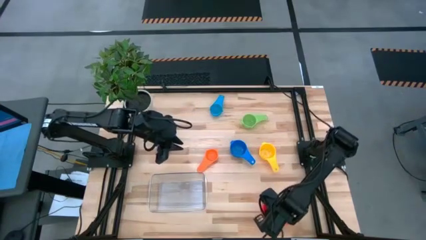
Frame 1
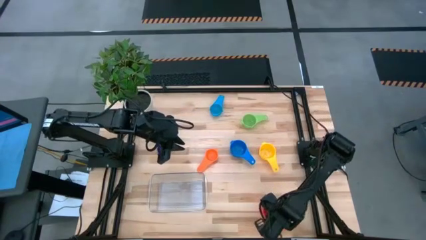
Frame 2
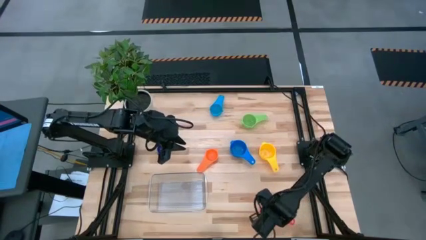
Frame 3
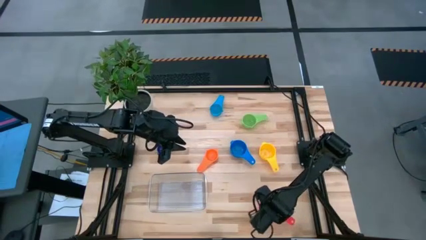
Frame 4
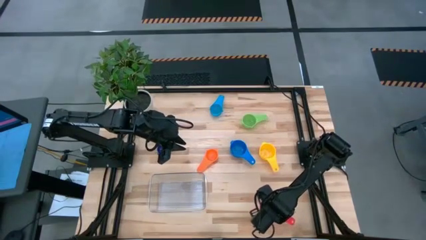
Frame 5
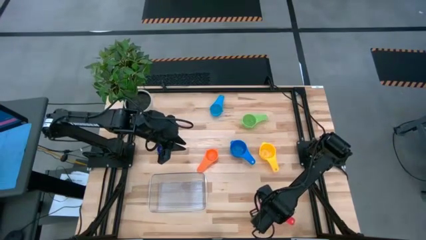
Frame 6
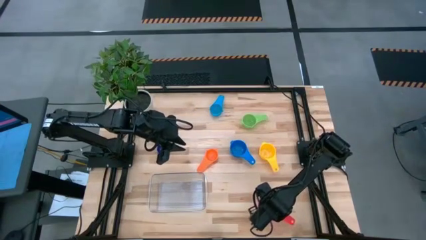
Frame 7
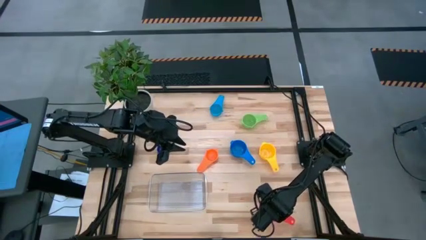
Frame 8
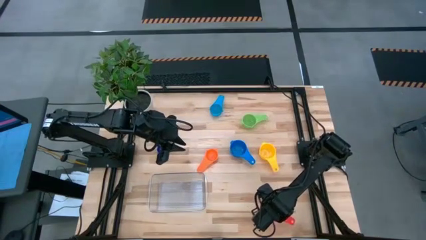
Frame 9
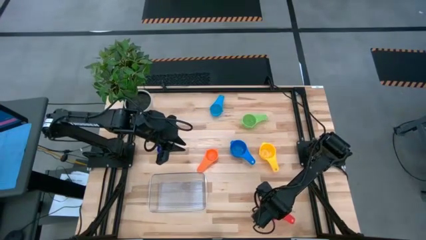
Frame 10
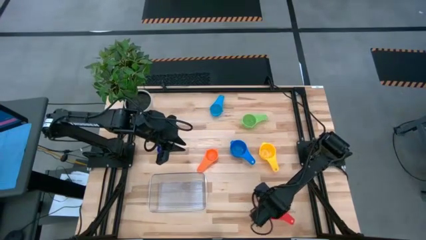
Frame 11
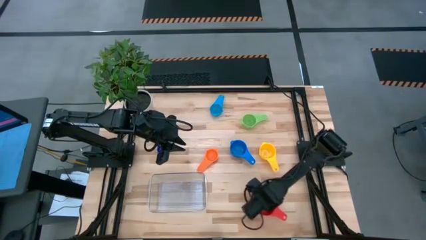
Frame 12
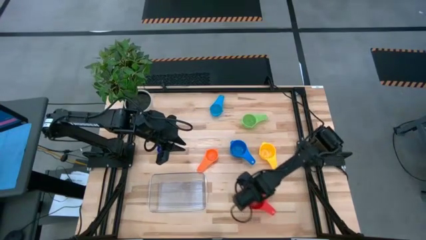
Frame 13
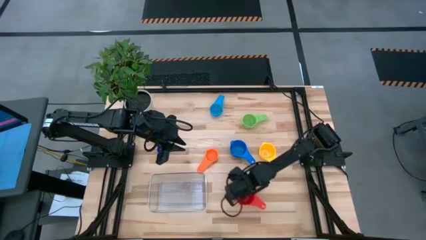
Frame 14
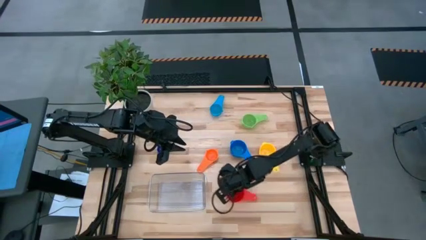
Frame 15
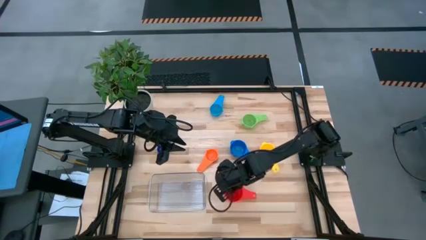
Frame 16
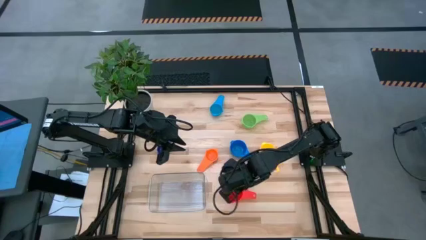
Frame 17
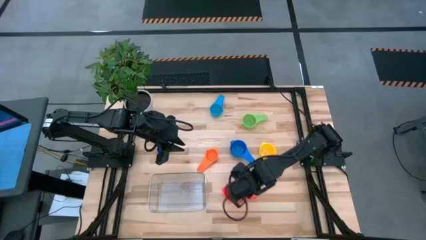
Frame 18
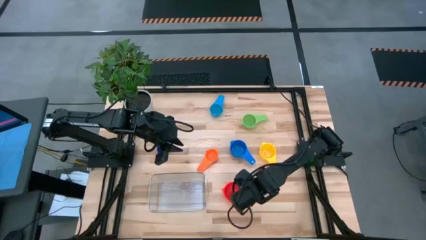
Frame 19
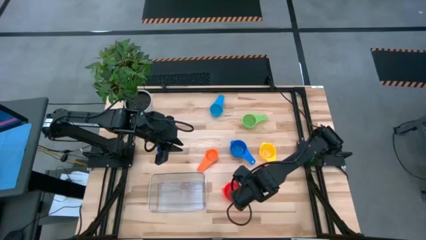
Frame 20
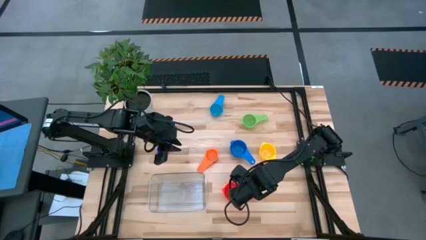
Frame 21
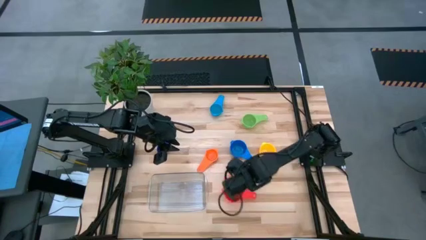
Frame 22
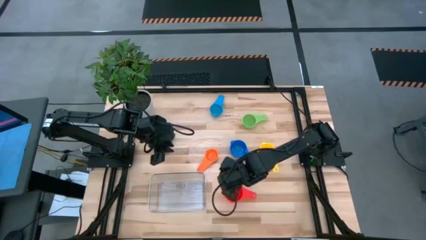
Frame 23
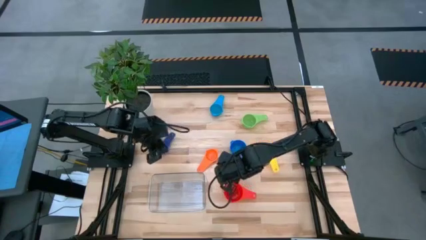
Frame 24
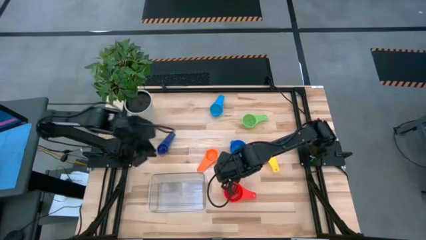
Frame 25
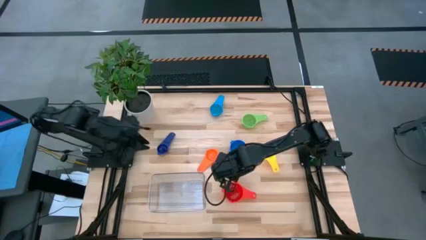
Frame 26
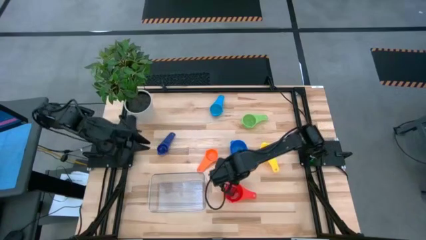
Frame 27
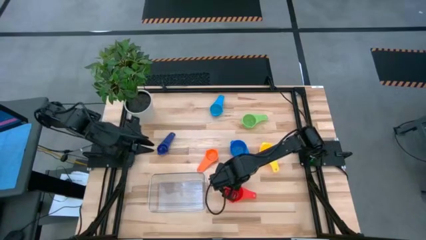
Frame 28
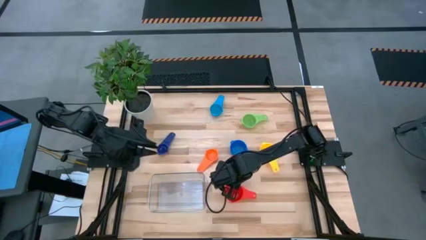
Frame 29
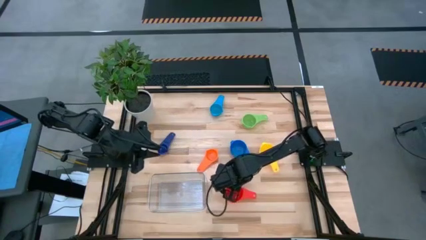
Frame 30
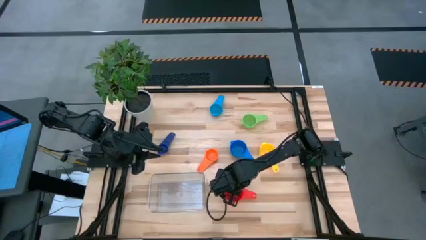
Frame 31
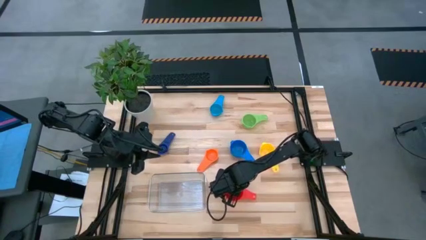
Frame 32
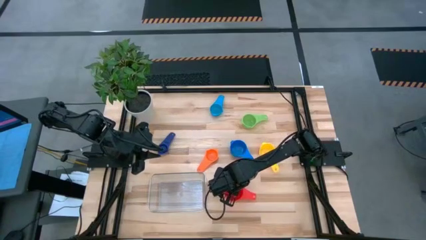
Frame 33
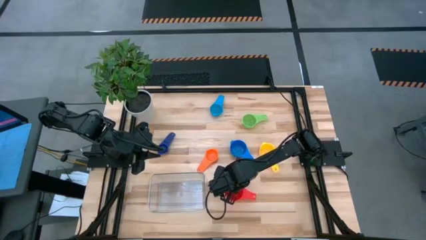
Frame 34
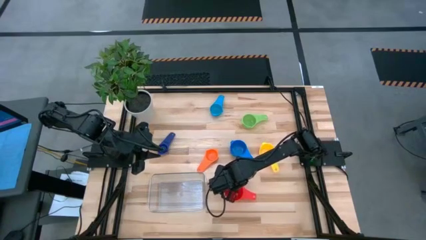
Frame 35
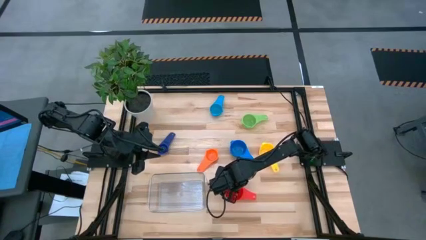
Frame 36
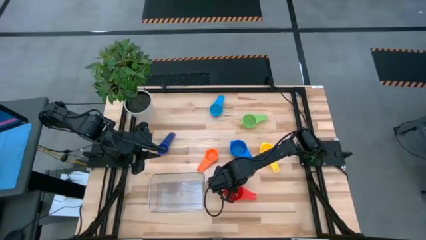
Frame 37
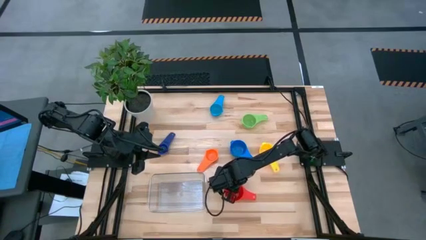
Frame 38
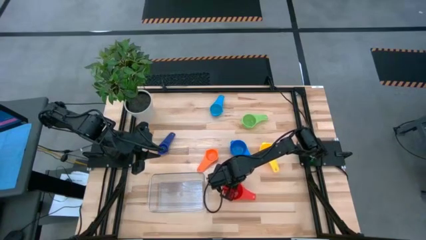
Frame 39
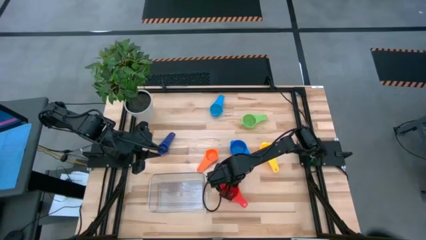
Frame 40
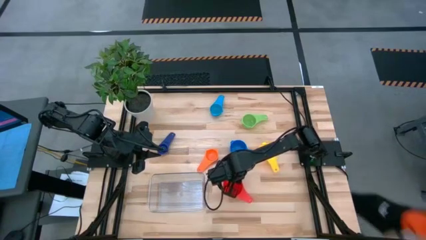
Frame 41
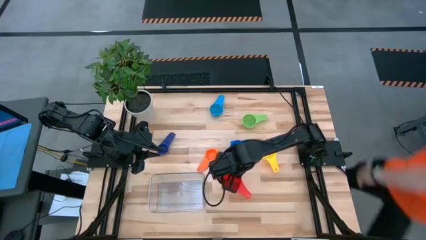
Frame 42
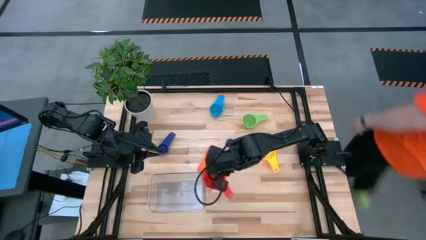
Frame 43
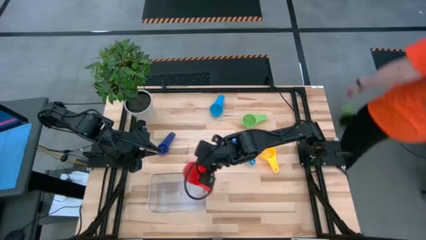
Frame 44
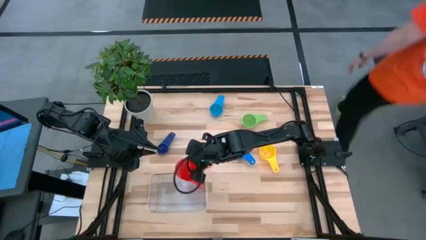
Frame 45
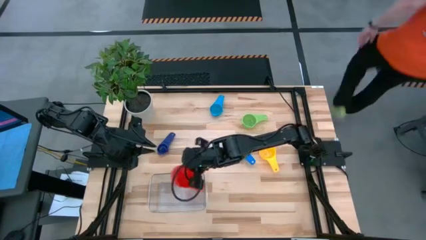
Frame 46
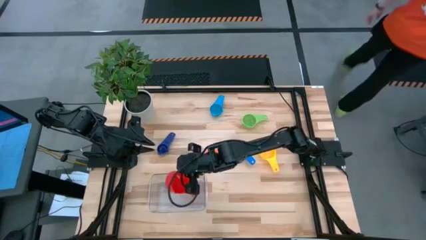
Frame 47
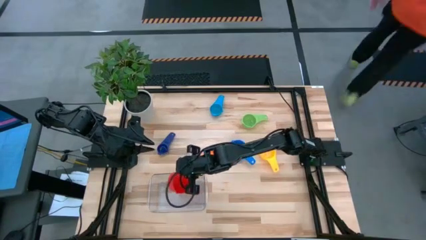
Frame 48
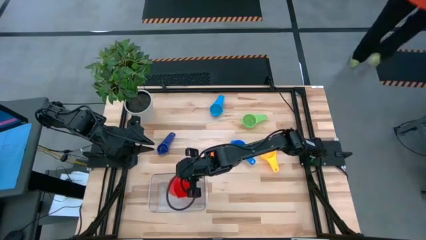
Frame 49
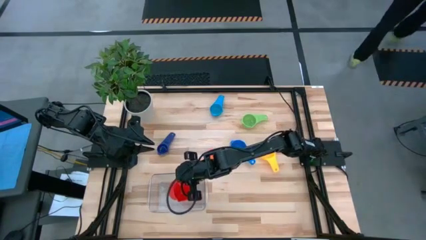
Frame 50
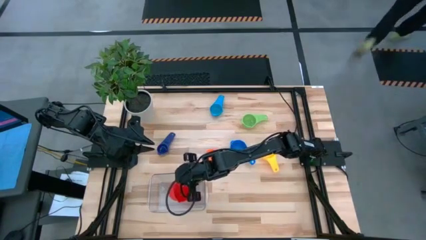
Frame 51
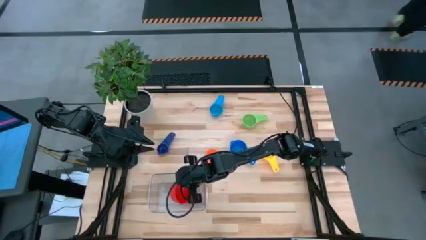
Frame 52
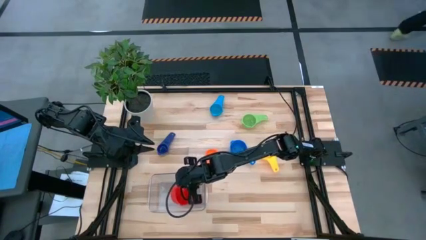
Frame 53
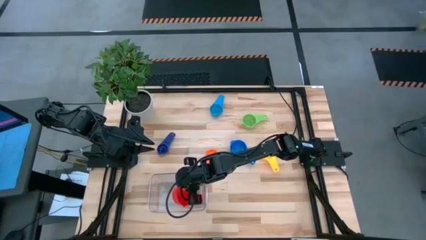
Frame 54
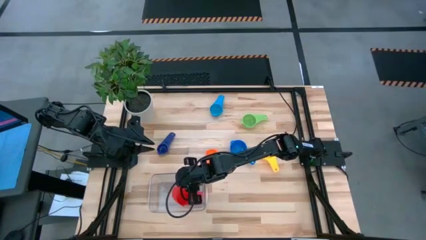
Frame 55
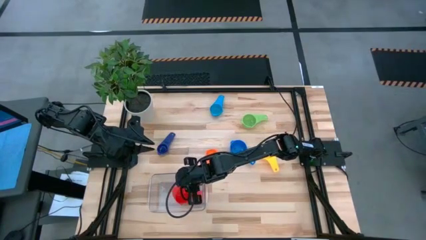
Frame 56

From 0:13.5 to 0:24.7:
Task: Nest measuring cups in basket
Put the red measuring cup into the transparent bin

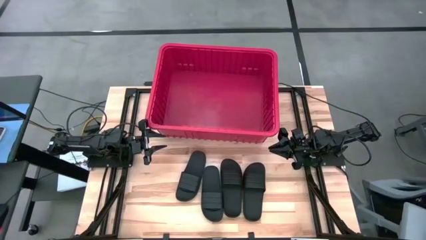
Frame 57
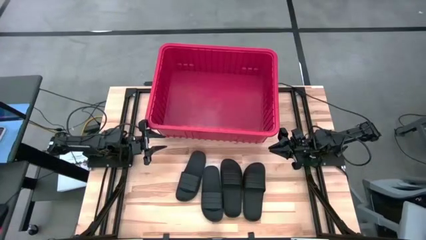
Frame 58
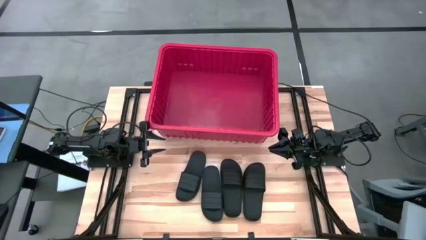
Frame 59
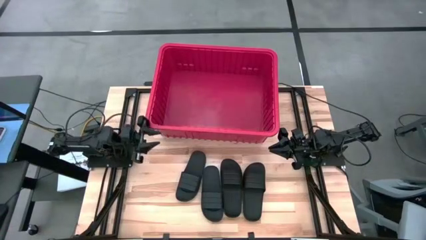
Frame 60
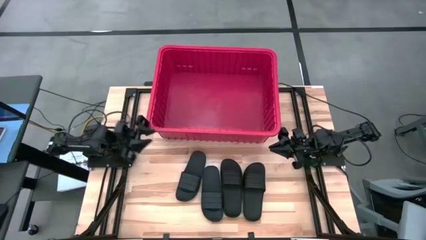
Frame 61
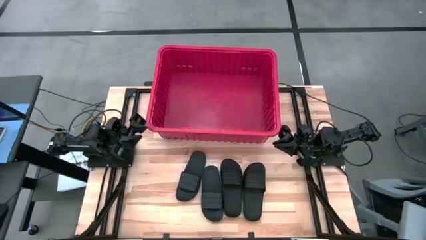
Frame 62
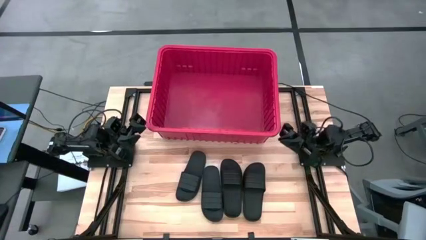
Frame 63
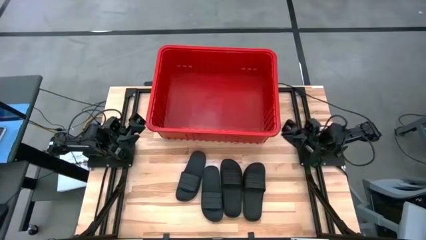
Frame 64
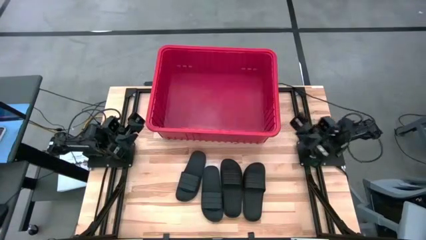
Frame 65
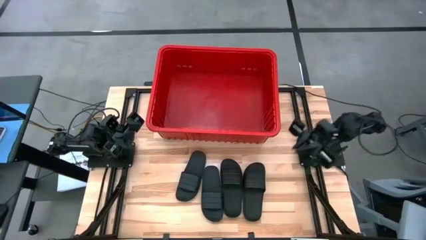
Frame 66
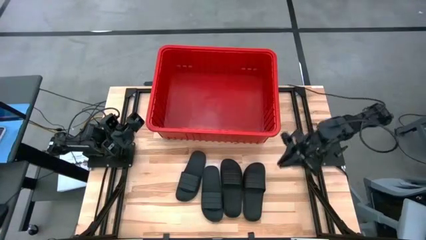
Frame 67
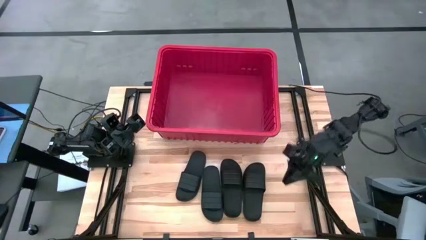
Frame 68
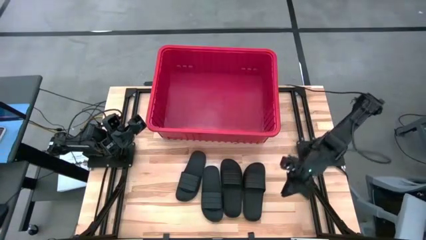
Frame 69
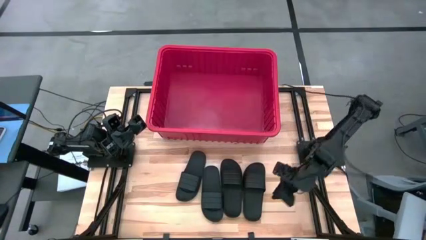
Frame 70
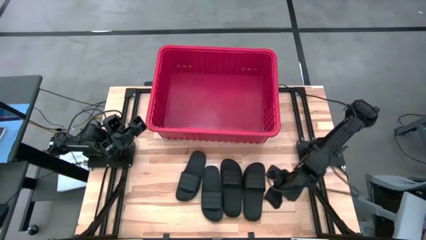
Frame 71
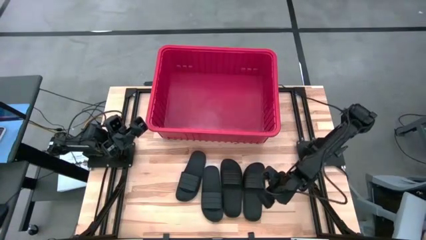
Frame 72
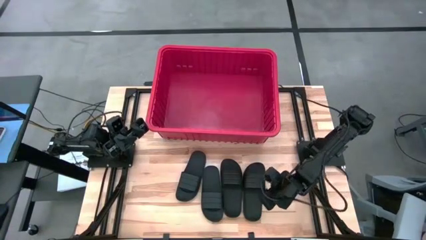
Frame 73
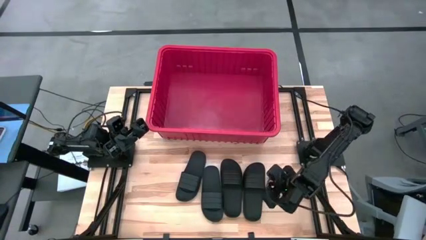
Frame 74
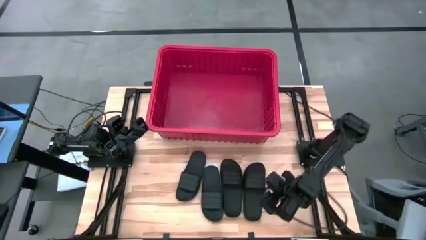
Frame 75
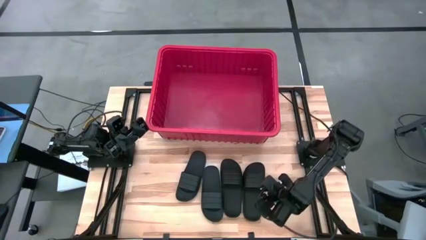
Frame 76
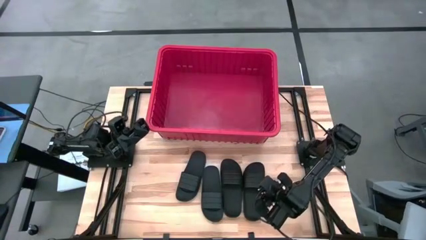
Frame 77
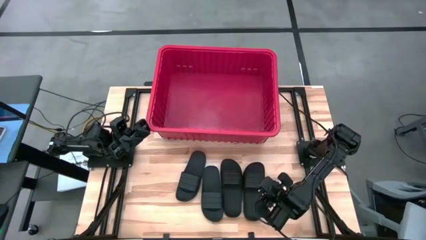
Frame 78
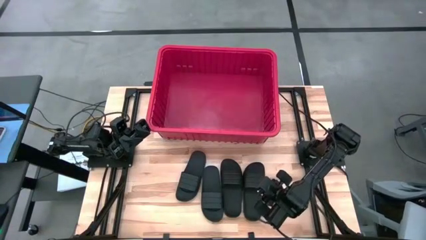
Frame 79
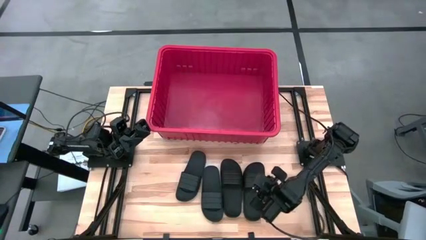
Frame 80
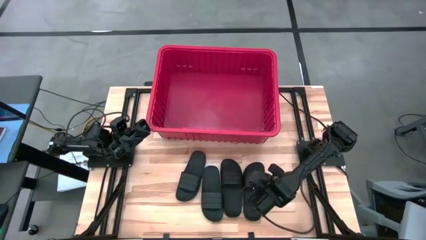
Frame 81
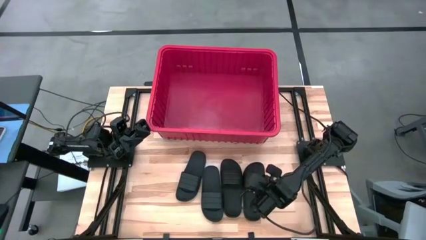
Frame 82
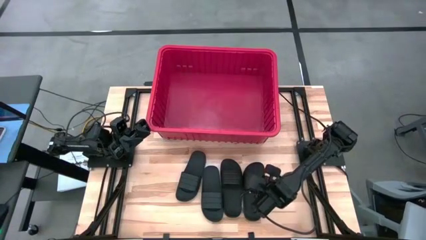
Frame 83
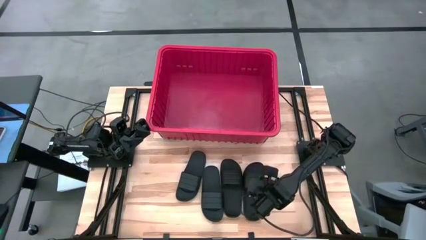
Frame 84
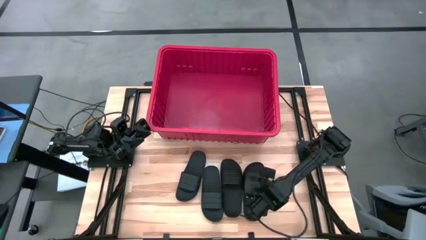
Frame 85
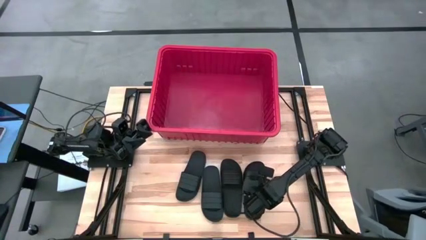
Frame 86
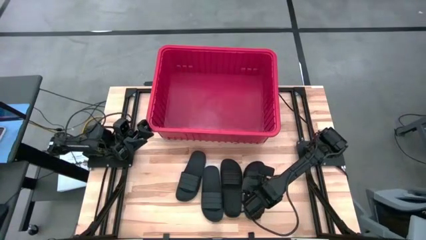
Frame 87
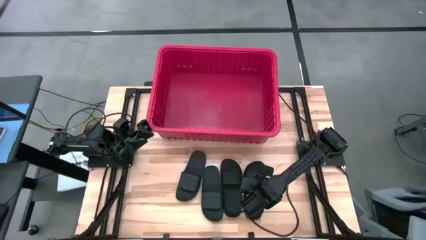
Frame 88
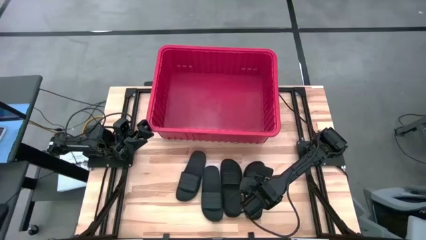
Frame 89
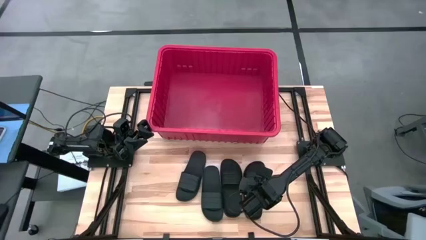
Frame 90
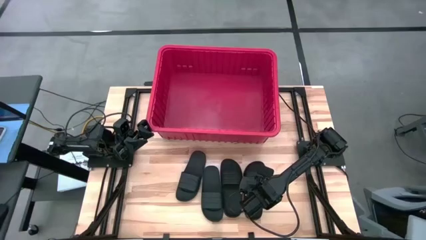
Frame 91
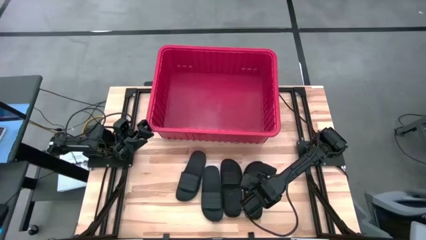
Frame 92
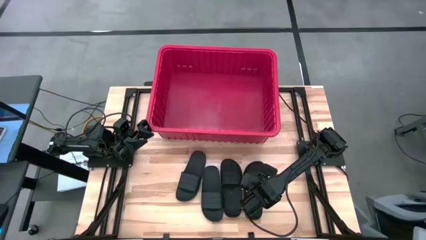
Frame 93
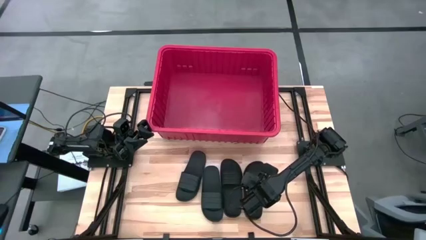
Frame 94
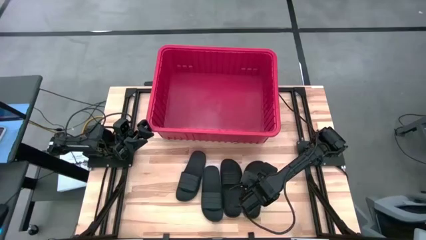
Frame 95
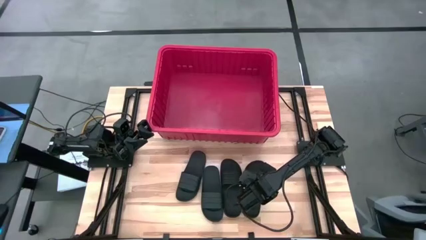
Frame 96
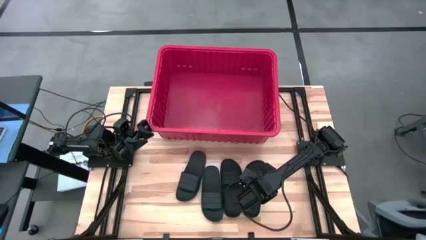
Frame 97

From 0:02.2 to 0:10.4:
Task: Pick and place slides into bin
Put the black slide into the red bin
